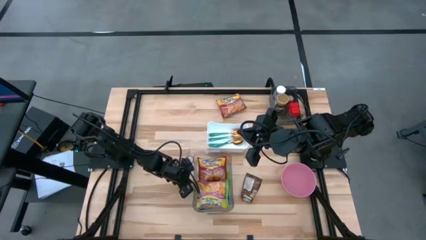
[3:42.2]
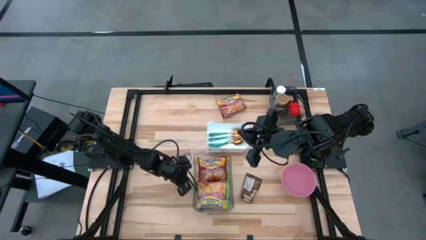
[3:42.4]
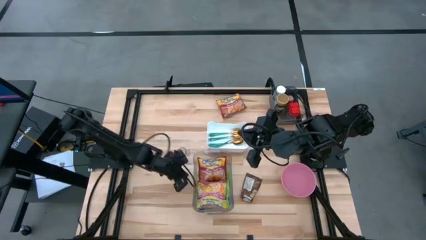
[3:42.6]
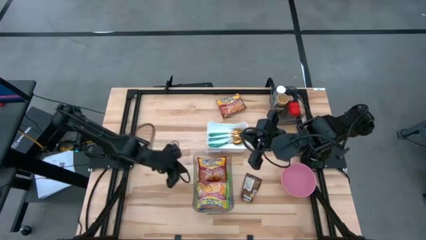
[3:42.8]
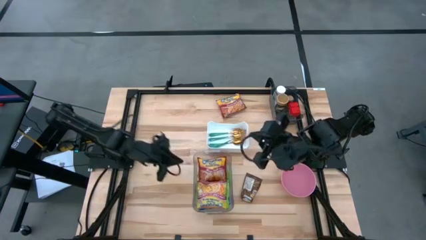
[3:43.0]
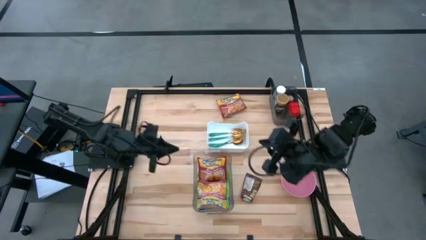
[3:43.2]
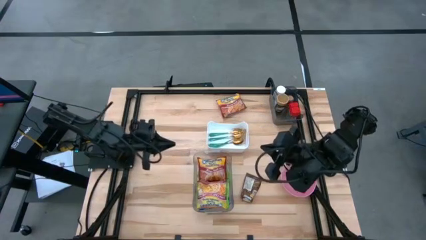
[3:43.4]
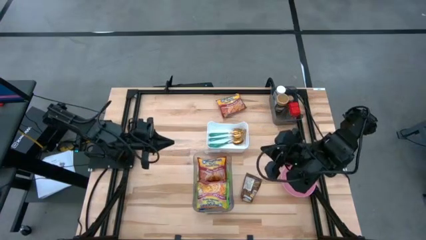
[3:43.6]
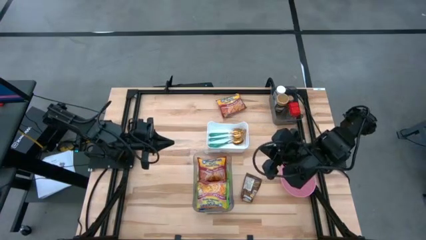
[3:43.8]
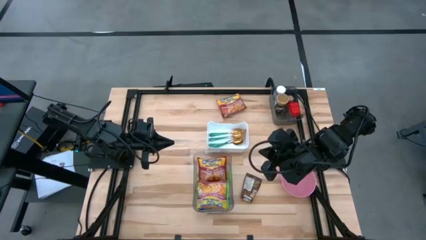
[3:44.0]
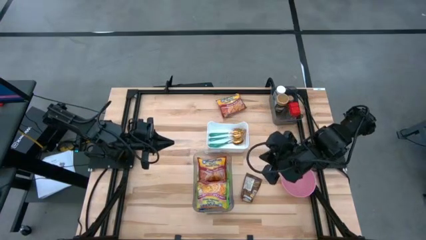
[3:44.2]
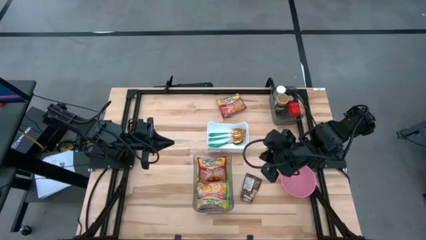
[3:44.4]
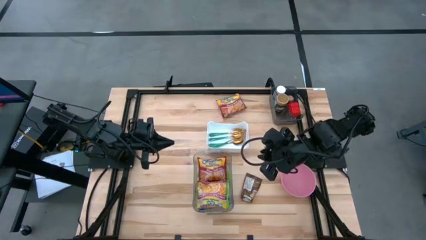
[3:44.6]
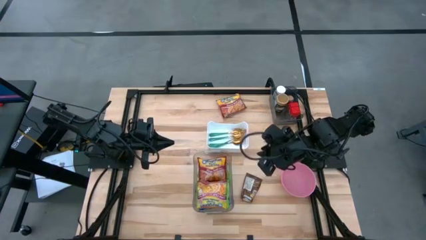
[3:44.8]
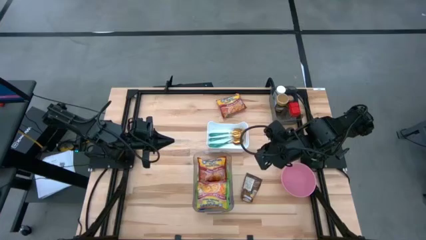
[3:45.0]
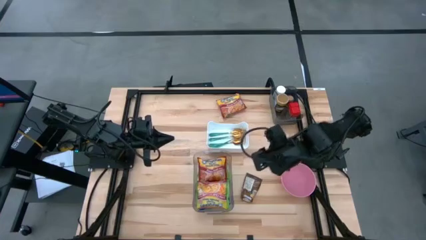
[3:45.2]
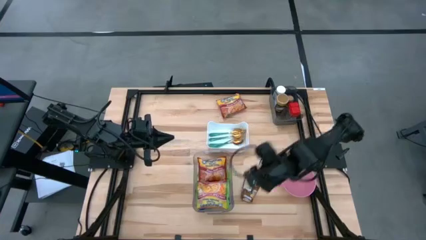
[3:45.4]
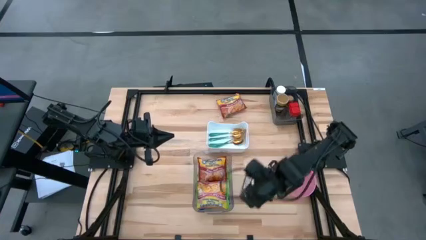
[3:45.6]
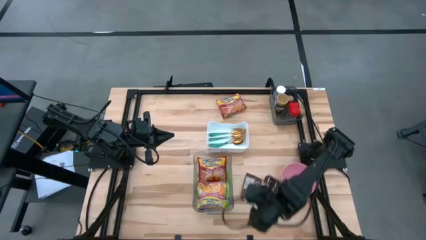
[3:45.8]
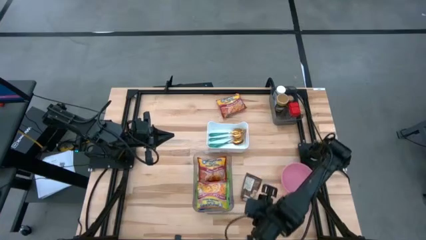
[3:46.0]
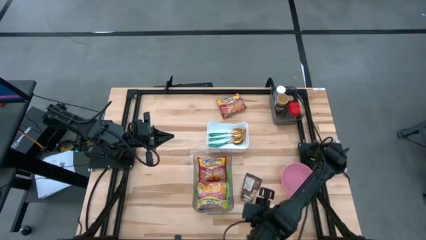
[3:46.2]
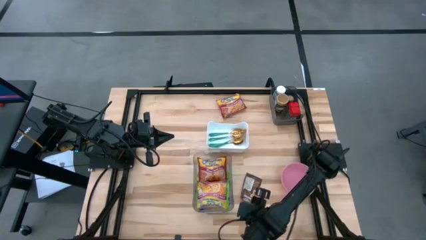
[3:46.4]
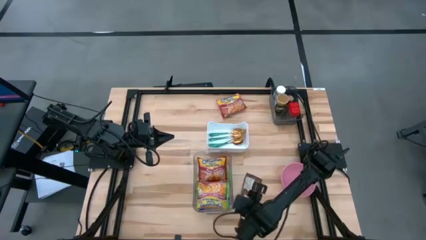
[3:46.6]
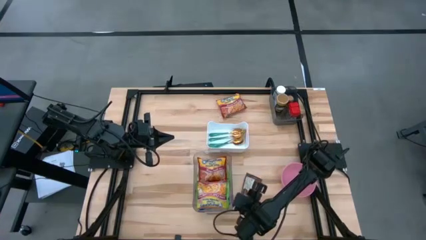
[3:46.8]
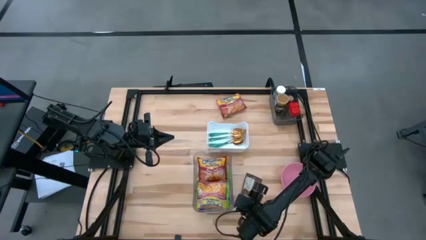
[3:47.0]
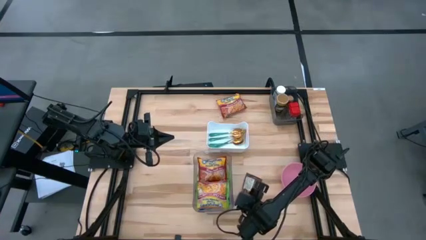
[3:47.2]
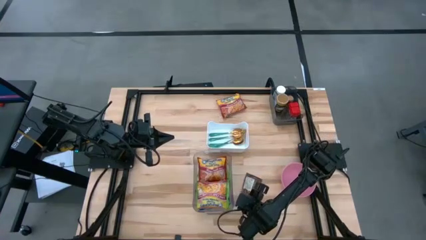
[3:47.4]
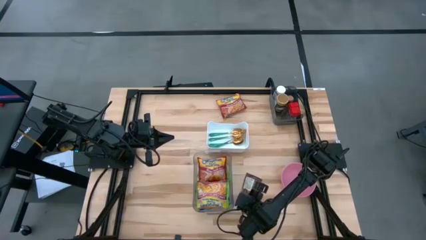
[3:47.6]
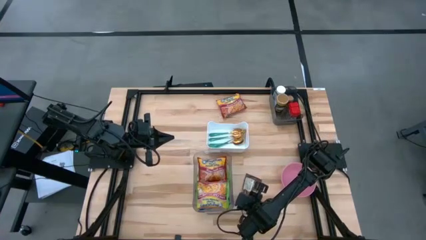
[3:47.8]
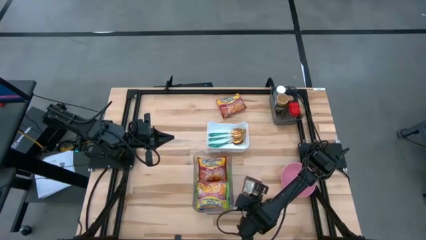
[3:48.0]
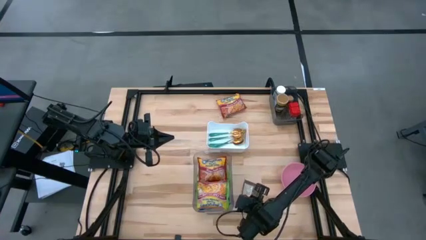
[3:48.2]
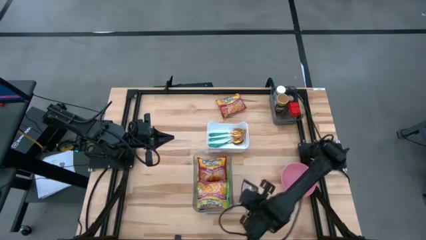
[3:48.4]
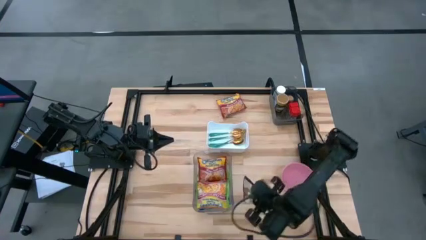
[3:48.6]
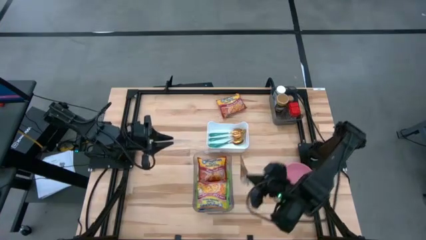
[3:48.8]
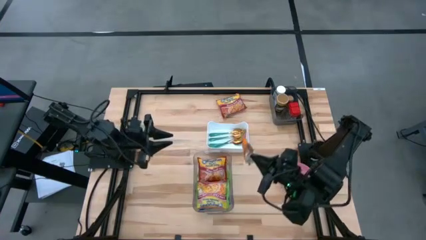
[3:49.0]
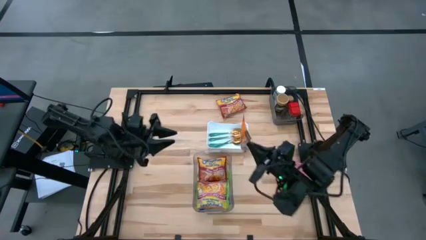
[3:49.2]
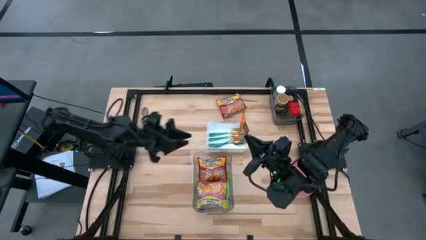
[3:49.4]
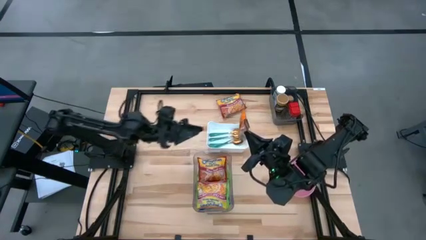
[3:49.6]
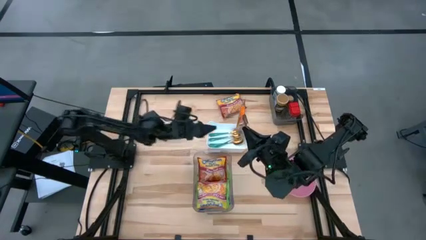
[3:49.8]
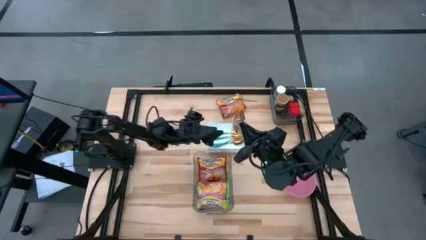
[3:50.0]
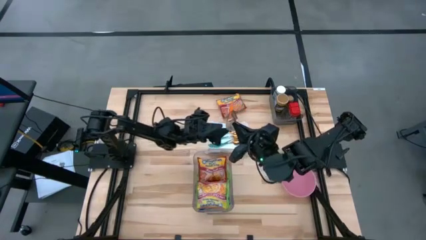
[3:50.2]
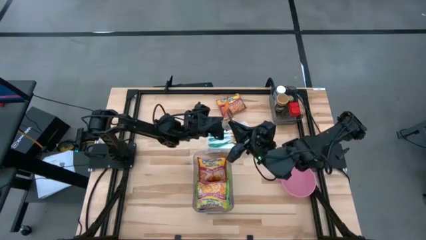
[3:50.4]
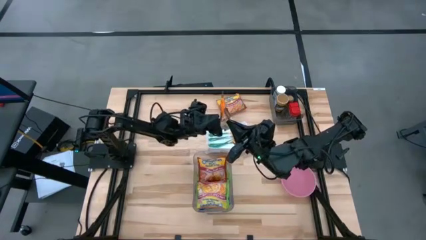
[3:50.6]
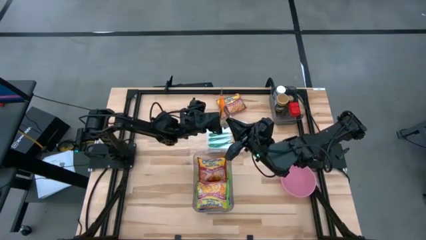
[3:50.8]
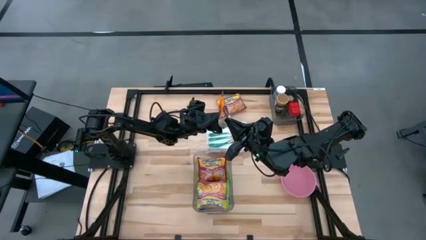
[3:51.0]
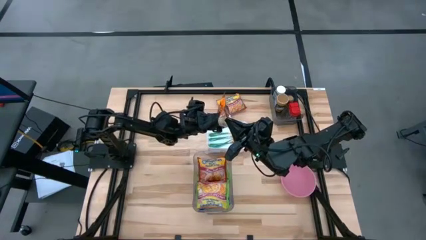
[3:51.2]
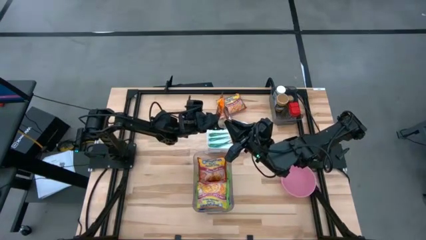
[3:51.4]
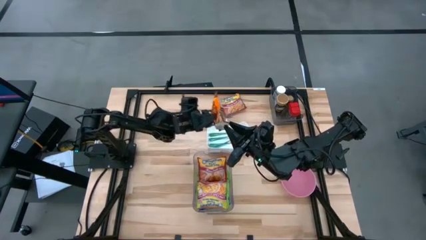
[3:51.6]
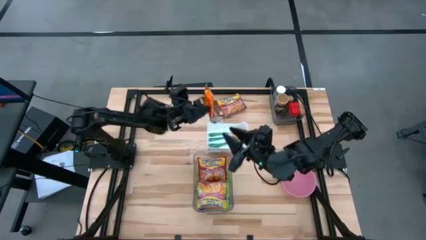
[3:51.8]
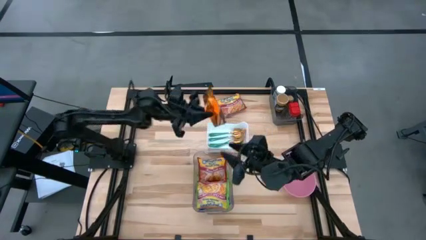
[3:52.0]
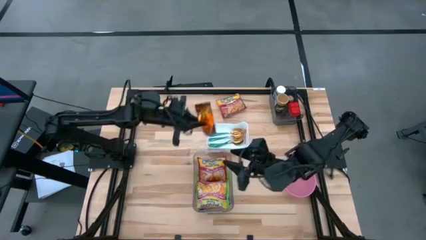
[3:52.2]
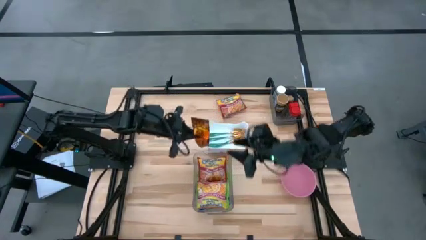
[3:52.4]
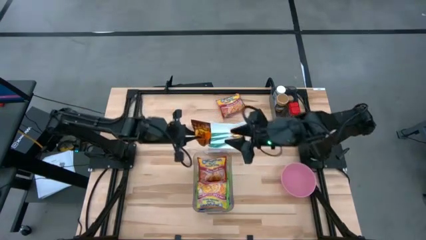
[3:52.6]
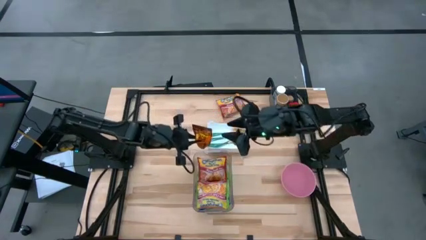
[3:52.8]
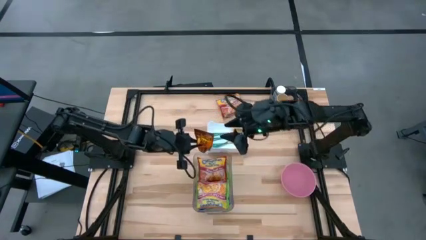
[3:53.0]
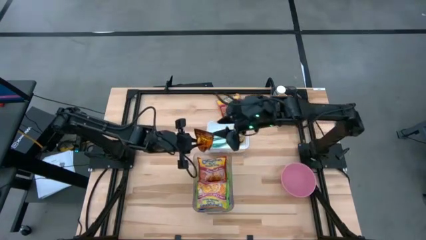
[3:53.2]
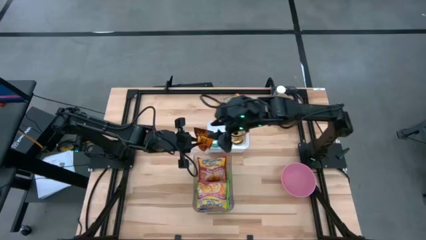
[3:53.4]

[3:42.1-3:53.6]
Task: Pick & Place Food Item
Put the orange spice pack into the black bin
